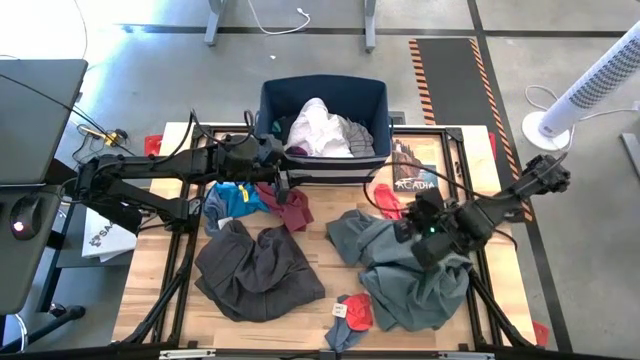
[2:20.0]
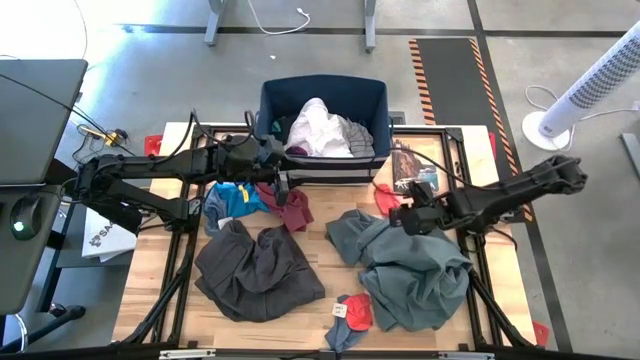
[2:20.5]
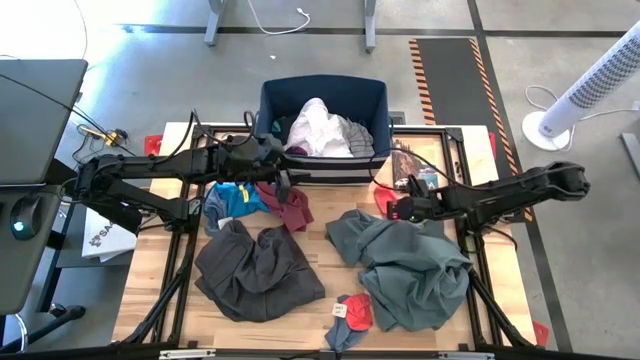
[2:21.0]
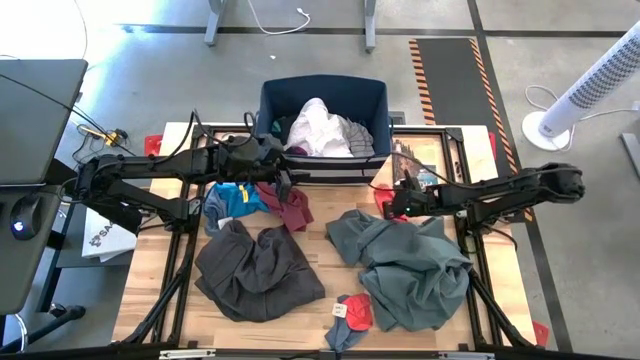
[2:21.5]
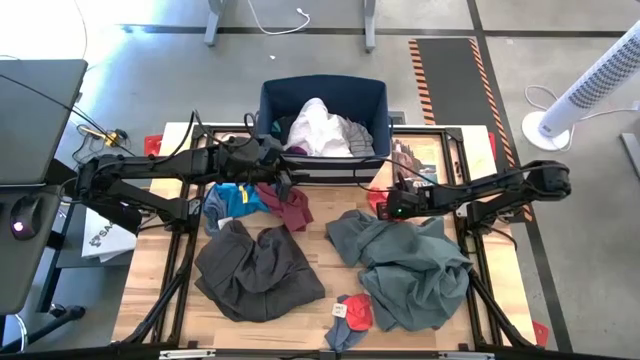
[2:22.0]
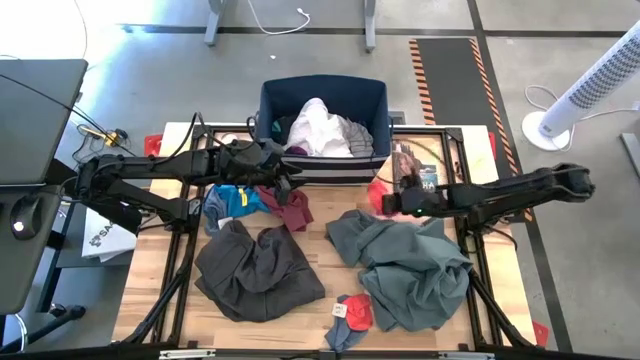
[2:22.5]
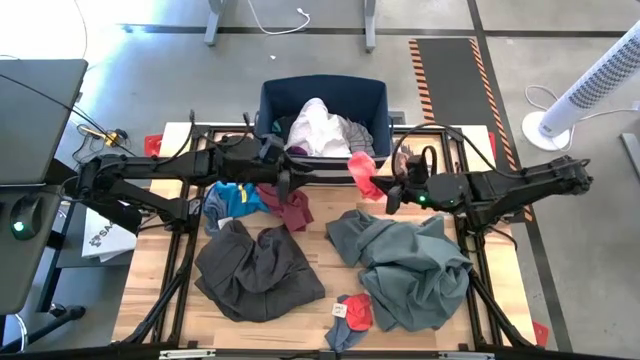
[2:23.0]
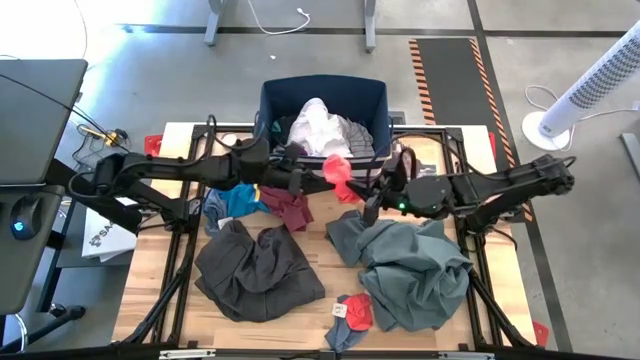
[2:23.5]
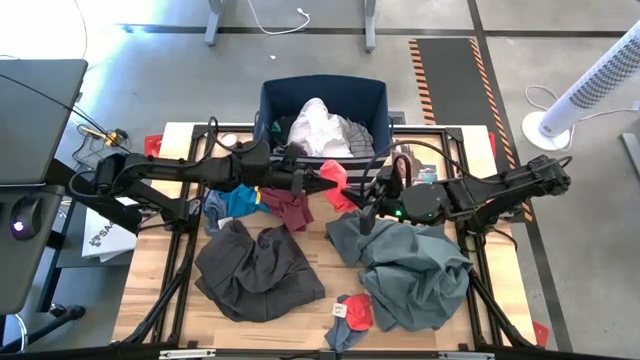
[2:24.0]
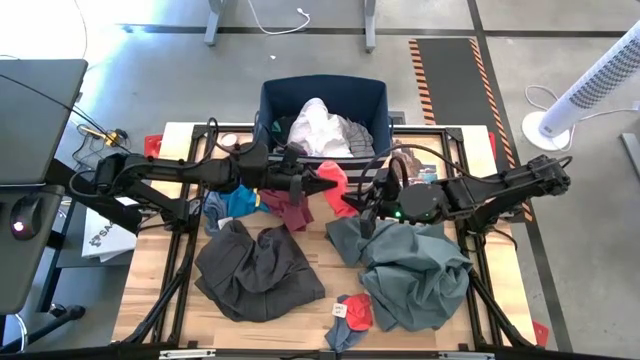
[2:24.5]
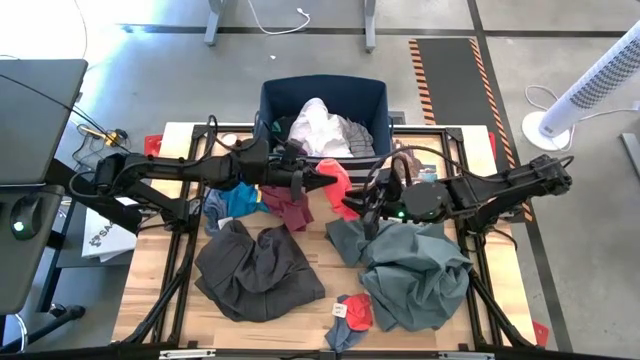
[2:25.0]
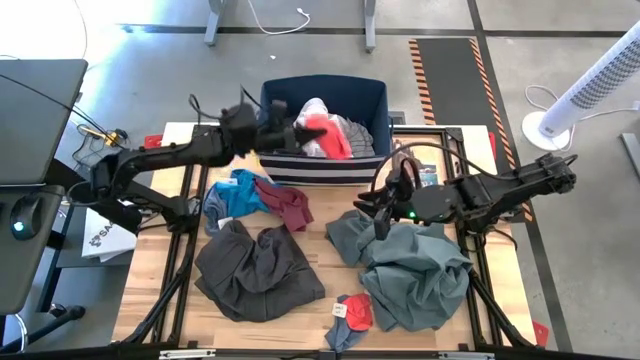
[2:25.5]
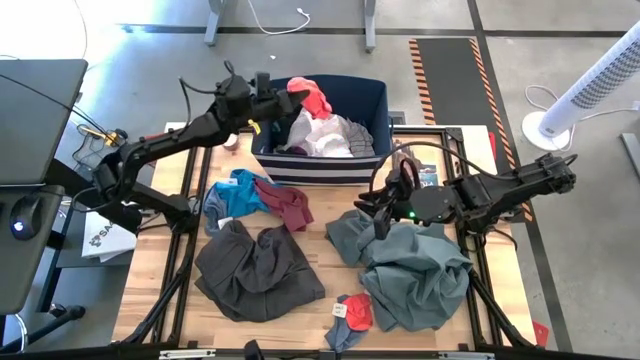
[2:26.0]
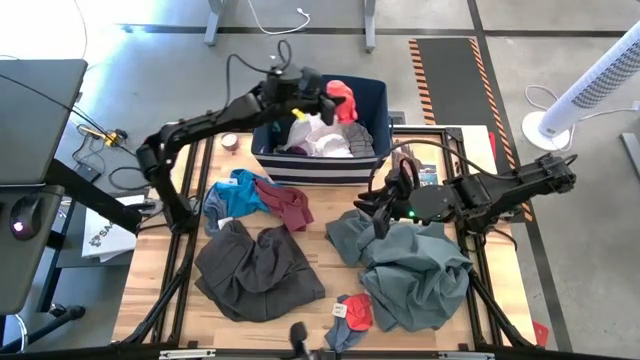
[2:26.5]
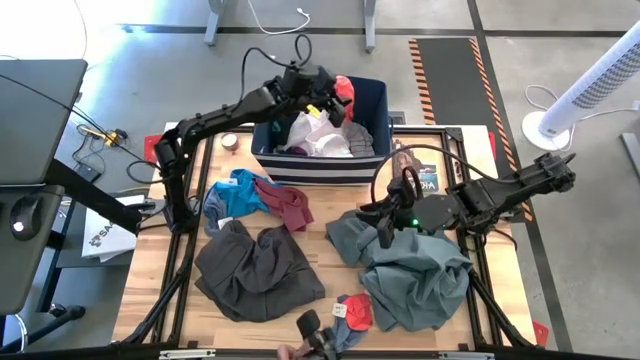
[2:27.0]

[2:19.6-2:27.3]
Task: Sort clothes
Put the orange sock into the blue laundry bin

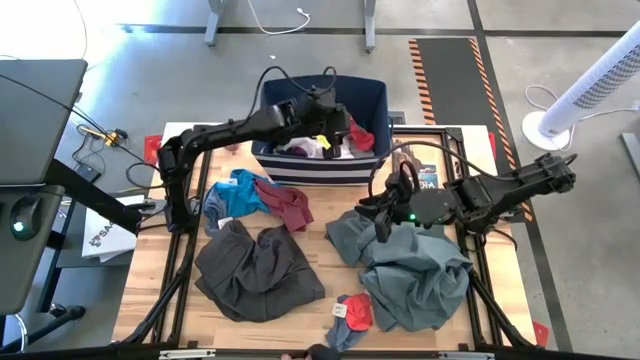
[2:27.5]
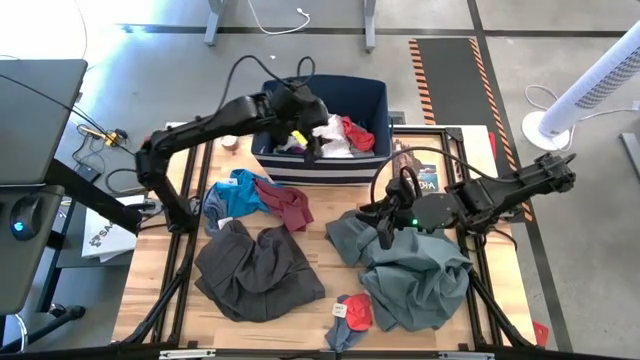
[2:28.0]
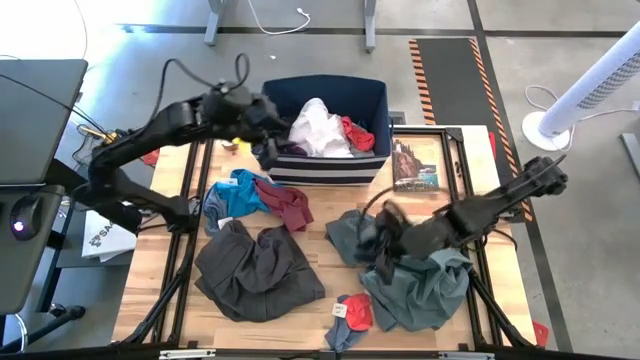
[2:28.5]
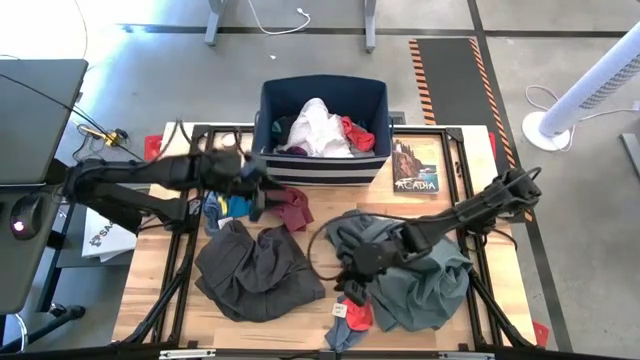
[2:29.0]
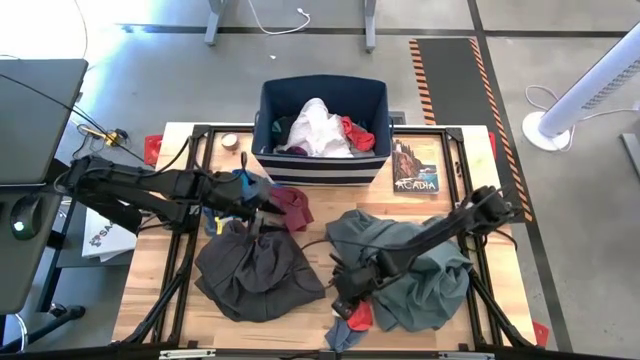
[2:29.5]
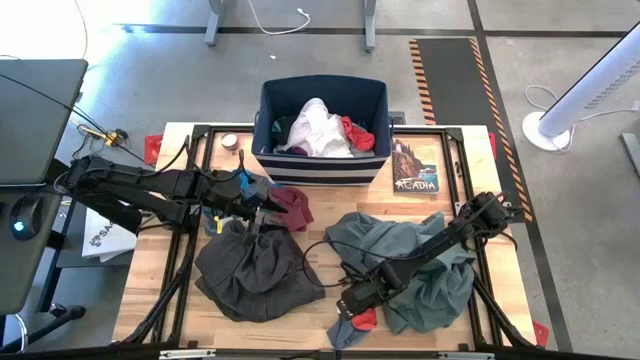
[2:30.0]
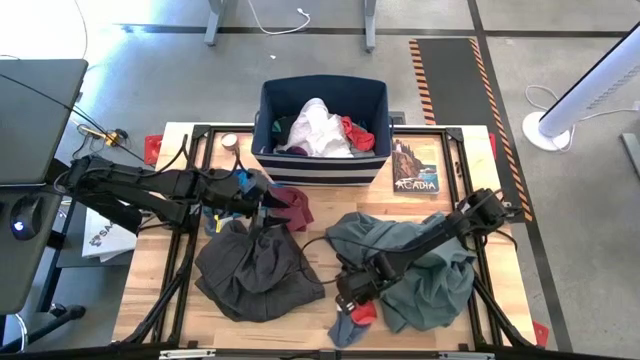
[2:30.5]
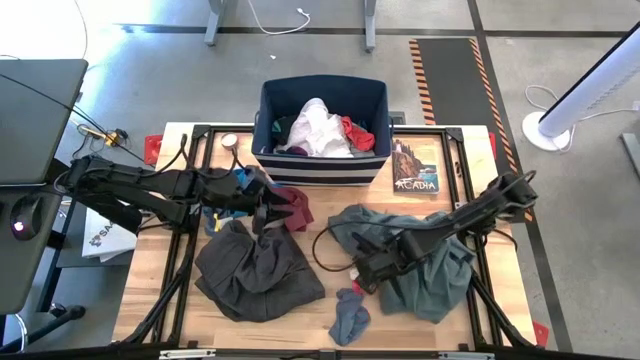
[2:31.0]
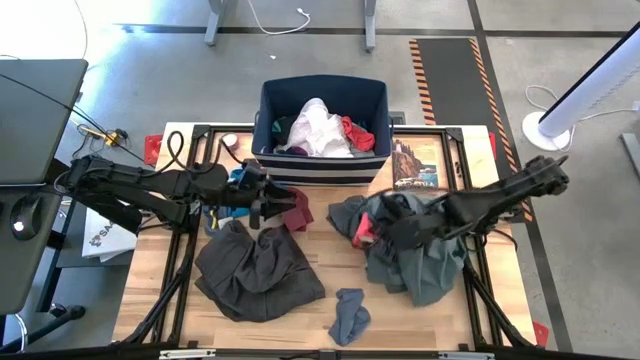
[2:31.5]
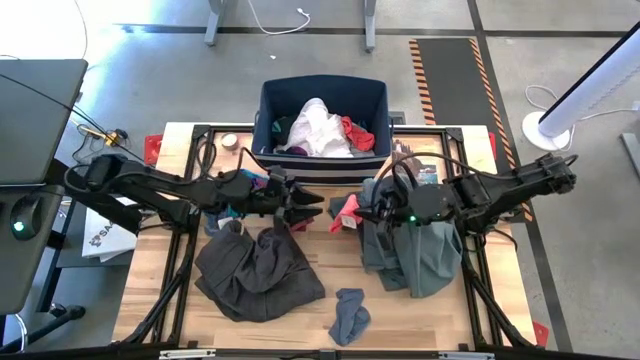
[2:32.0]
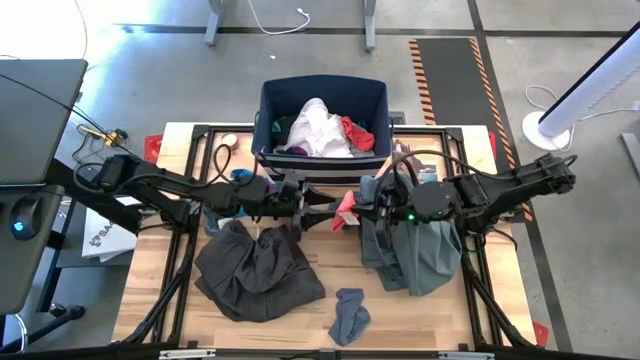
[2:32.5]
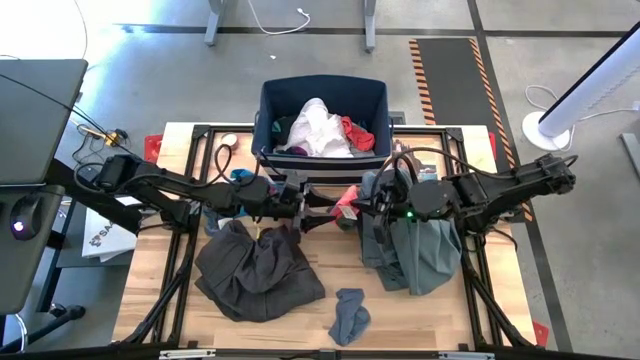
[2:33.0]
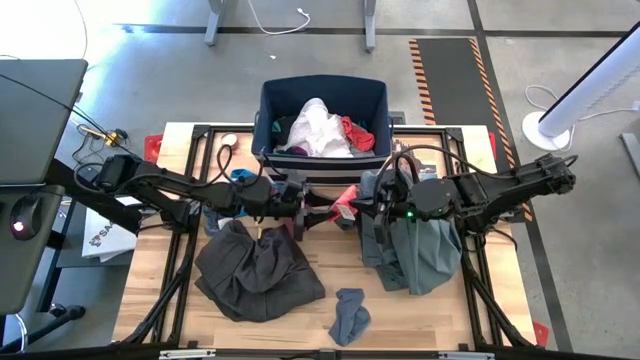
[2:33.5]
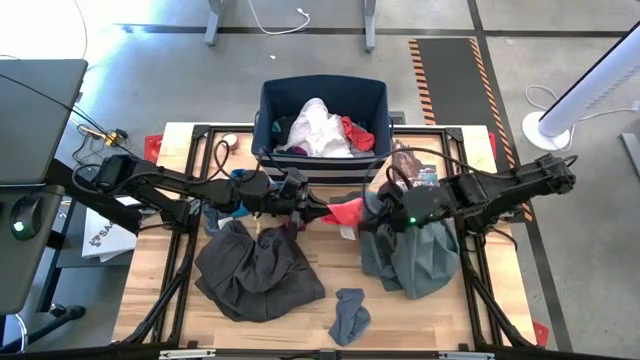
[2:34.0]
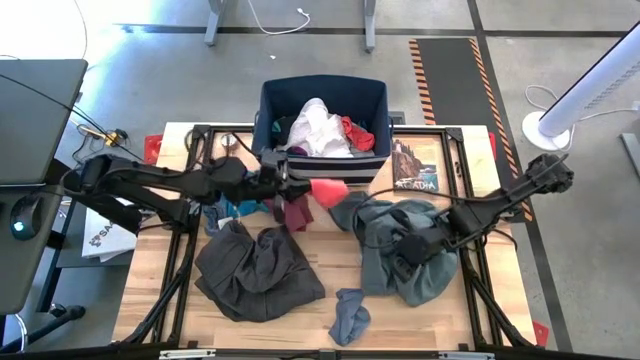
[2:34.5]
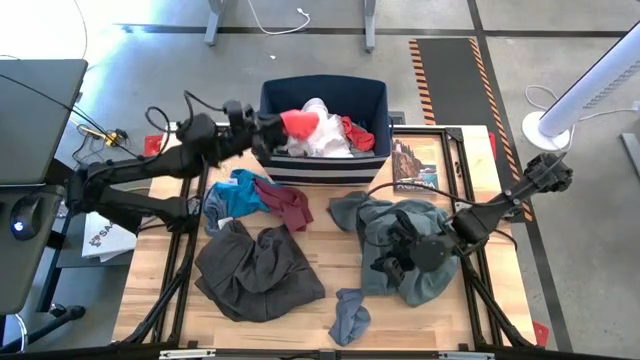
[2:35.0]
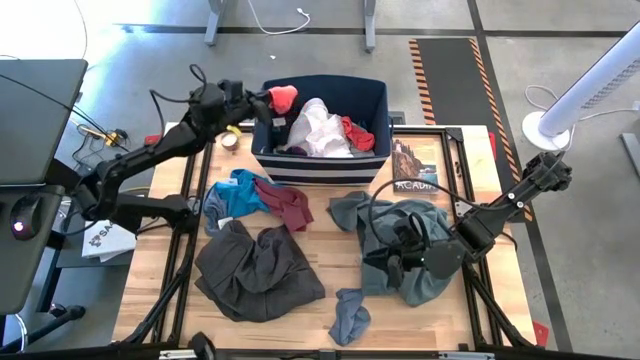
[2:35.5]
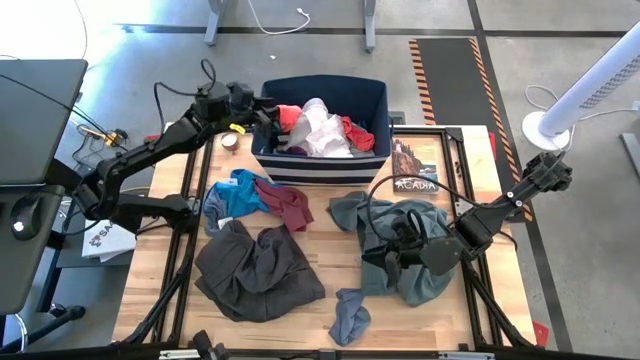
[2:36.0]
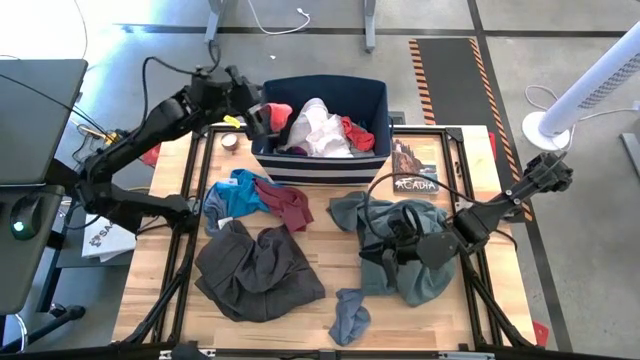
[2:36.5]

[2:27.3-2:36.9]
Put the orange sock into the blue laundry bin

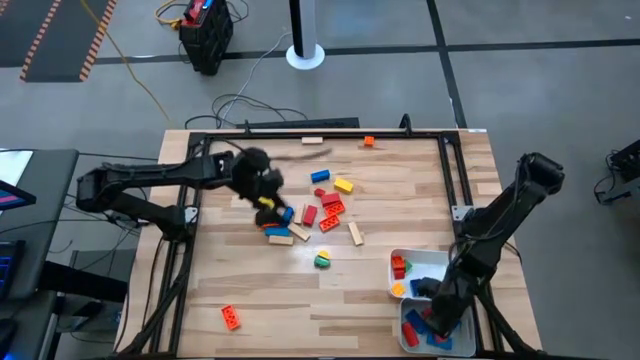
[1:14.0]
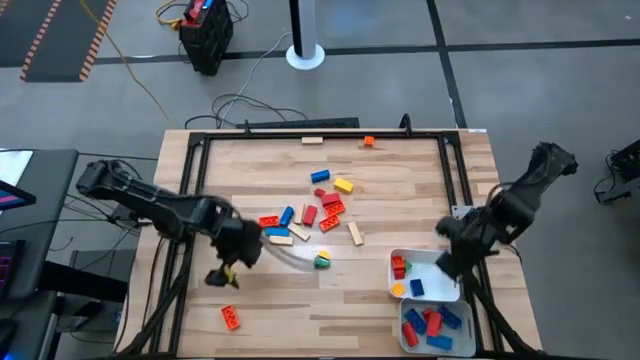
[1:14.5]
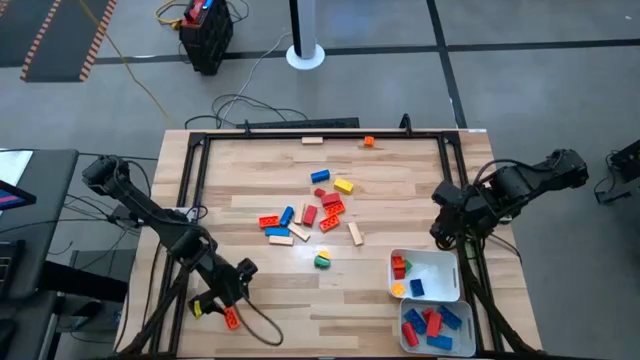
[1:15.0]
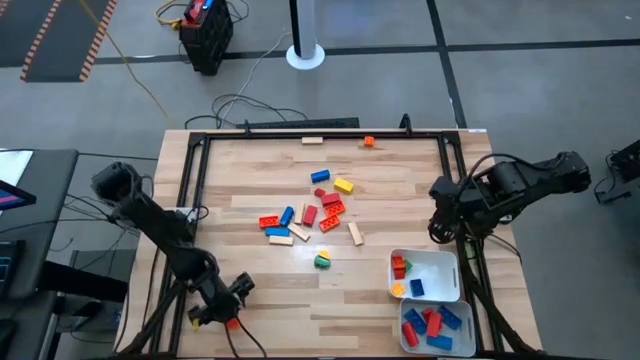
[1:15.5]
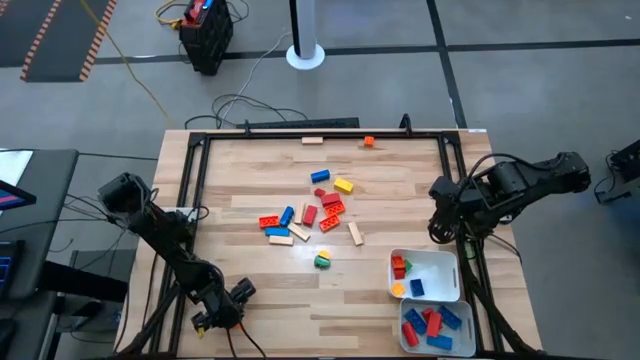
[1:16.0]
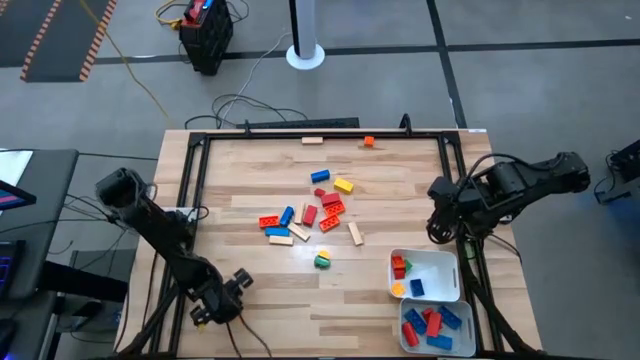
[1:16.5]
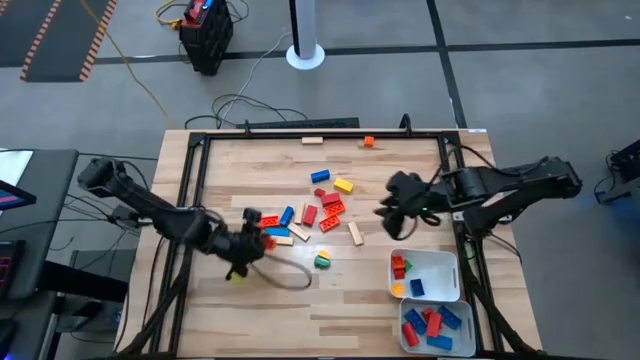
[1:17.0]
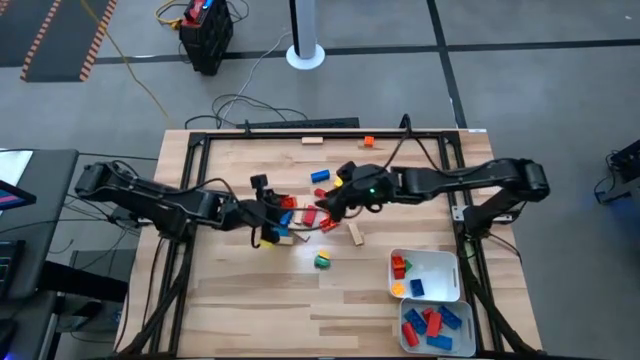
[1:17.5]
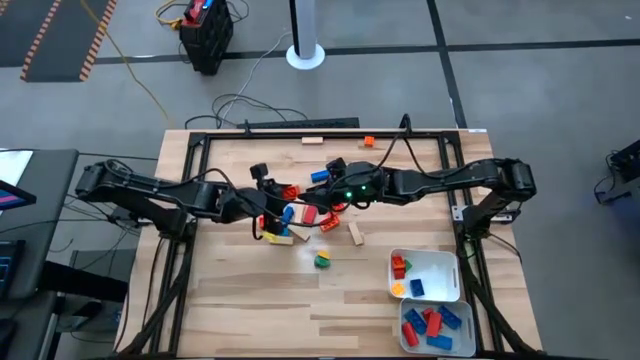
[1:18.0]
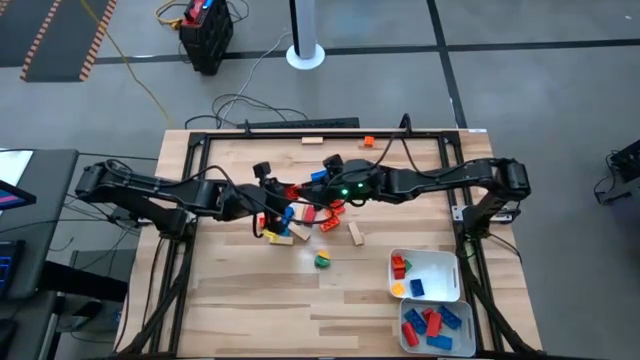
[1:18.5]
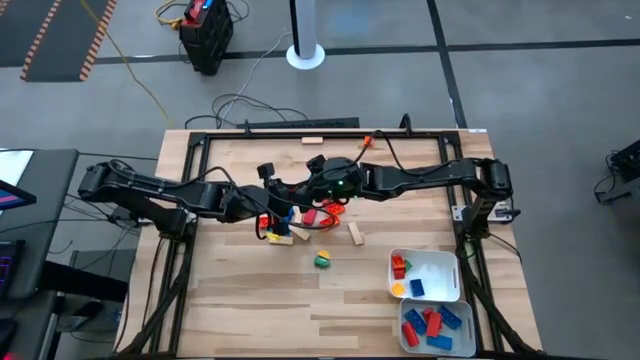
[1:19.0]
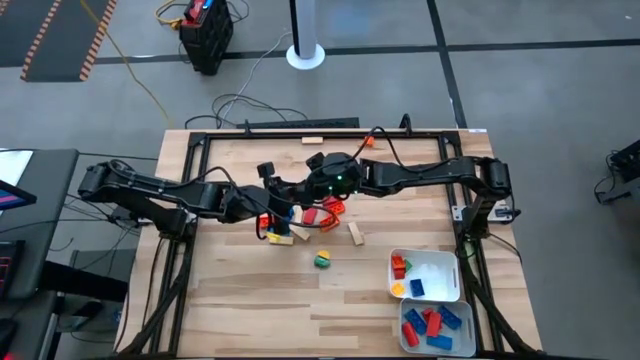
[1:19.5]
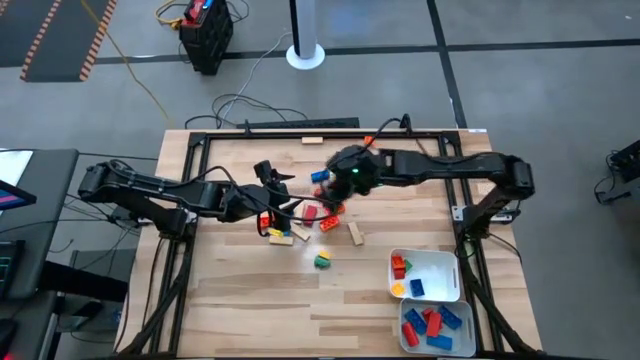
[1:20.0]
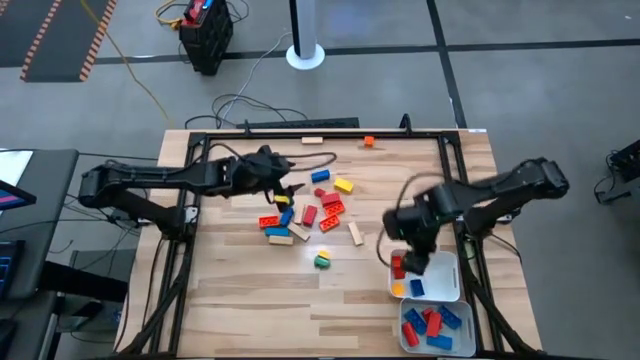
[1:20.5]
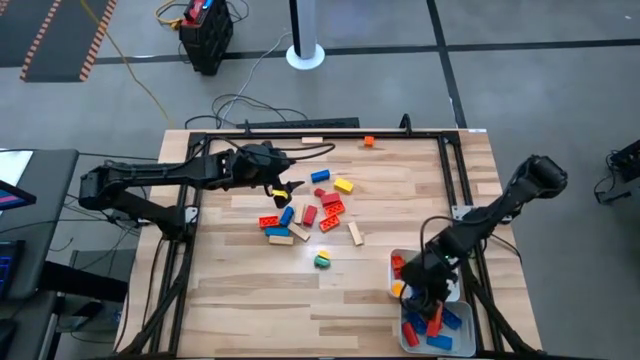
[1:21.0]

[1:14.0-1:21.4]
Task: Sort blocks by size
Put the big orange game piece into the gray bin
